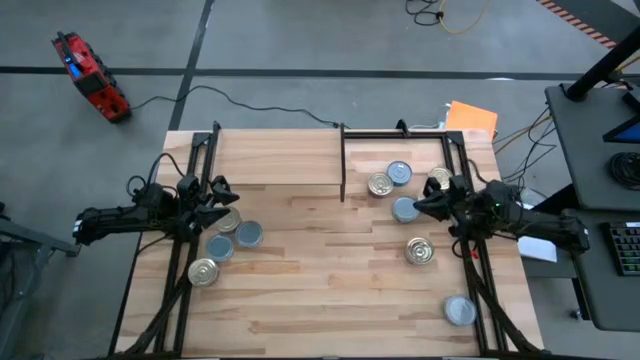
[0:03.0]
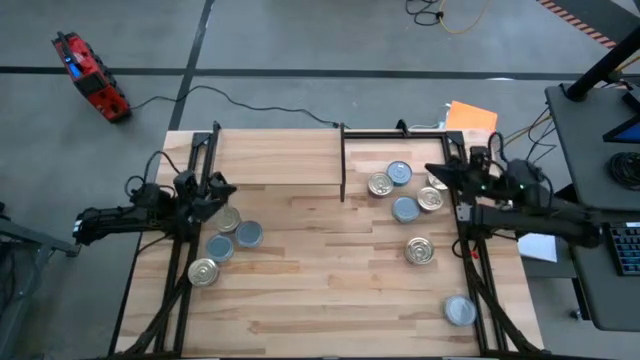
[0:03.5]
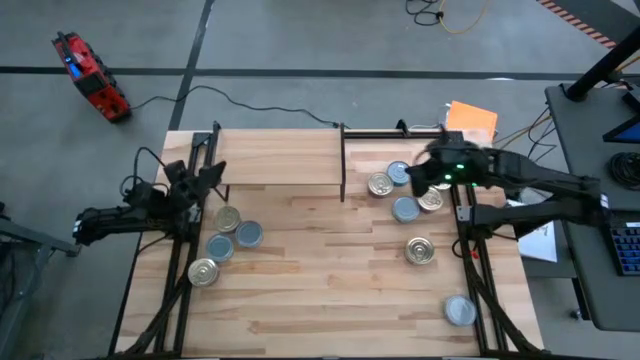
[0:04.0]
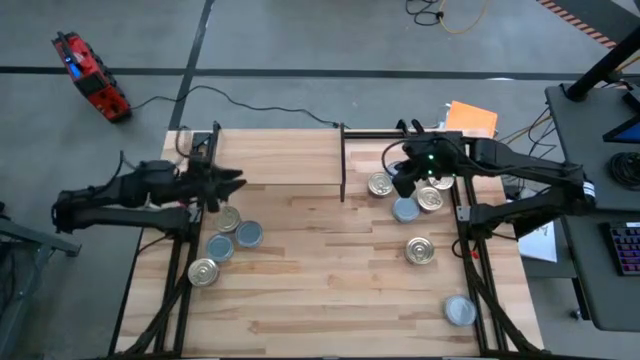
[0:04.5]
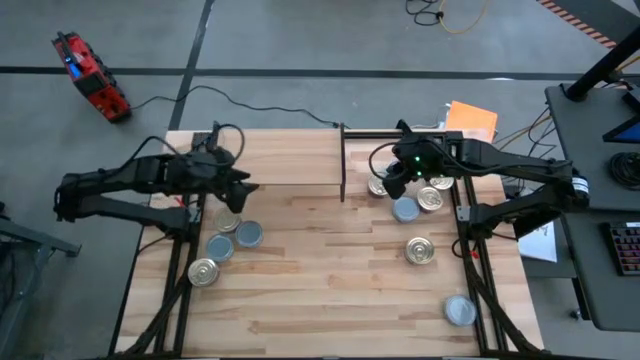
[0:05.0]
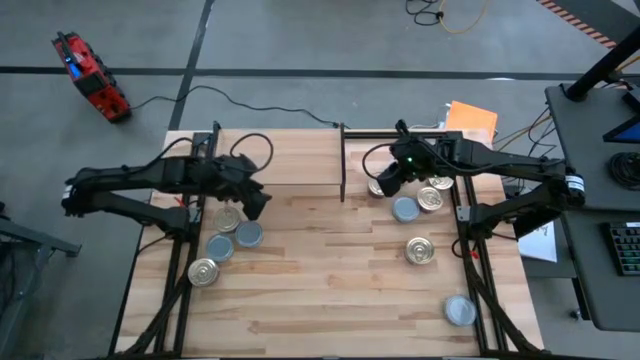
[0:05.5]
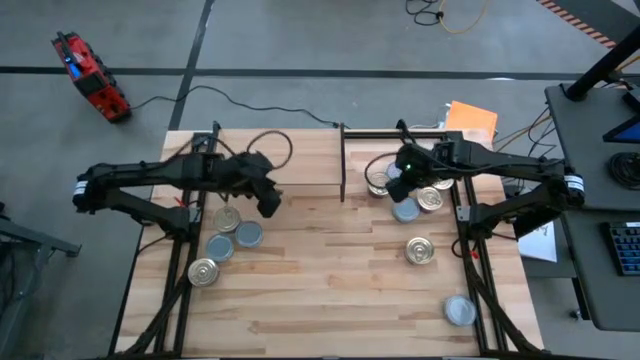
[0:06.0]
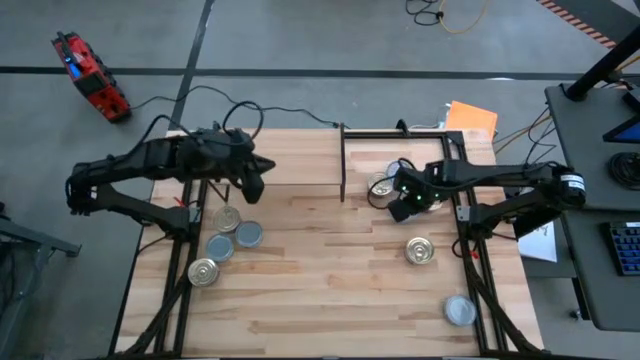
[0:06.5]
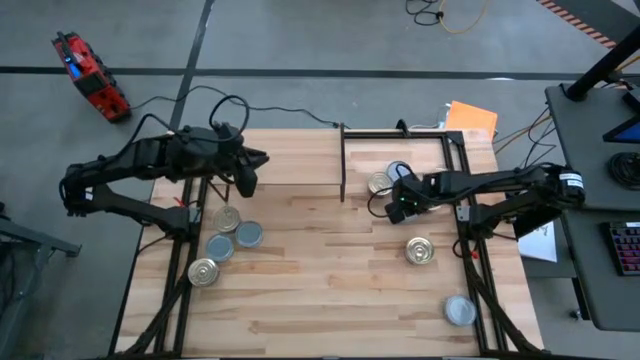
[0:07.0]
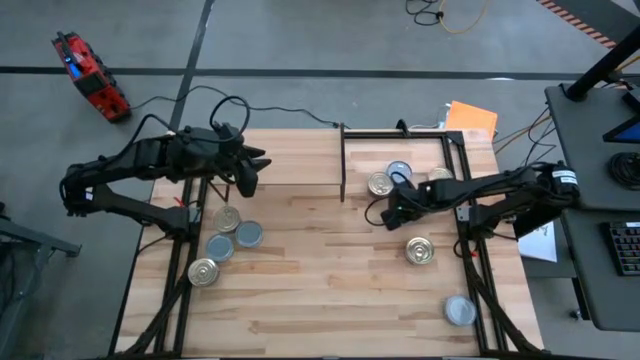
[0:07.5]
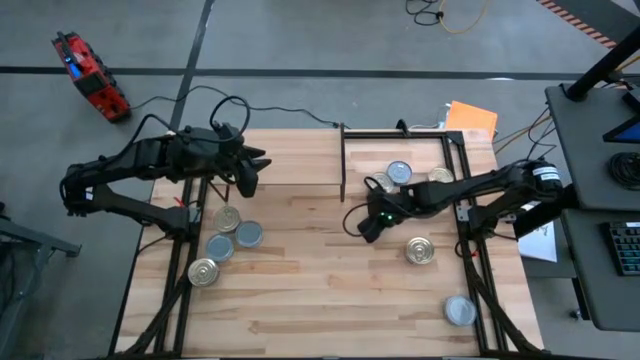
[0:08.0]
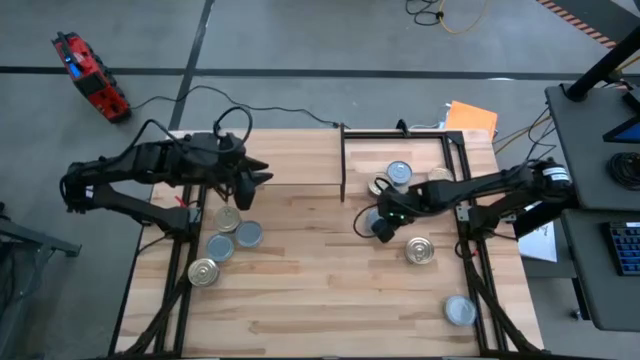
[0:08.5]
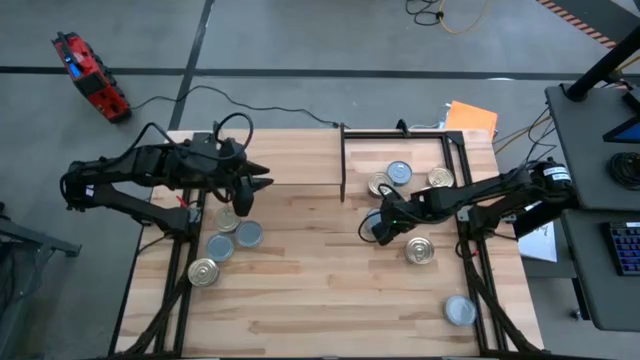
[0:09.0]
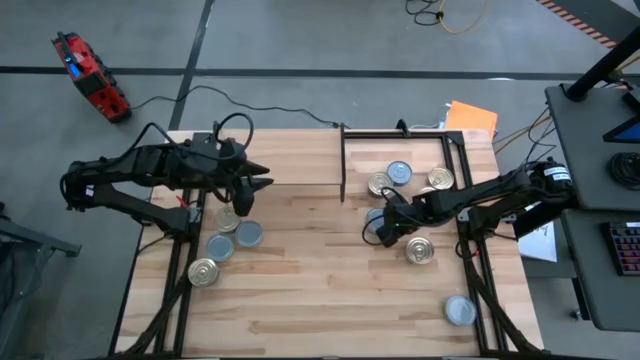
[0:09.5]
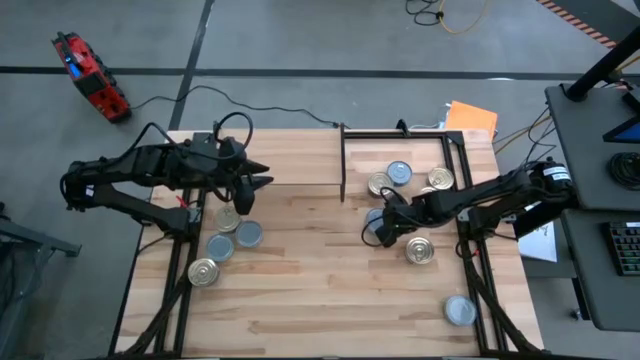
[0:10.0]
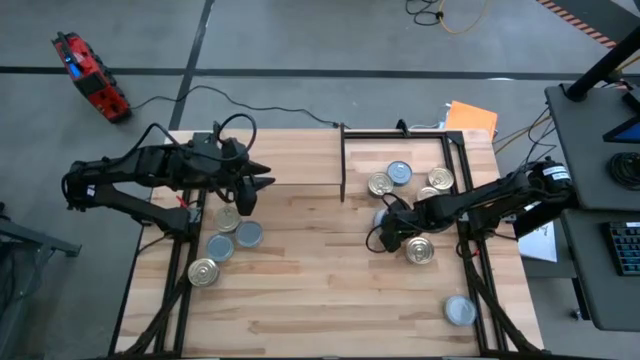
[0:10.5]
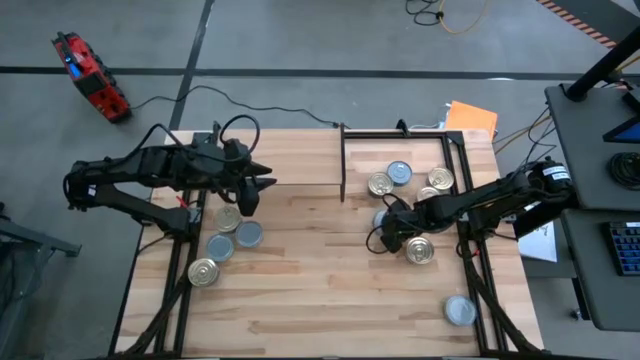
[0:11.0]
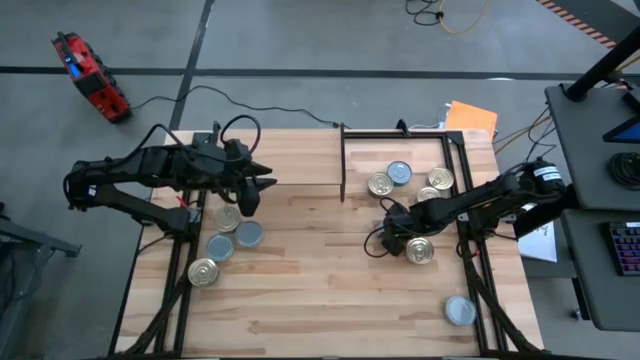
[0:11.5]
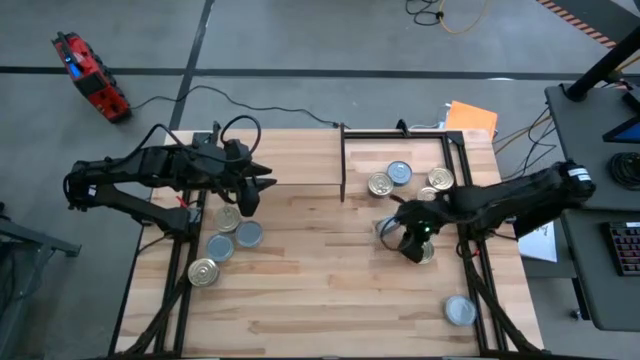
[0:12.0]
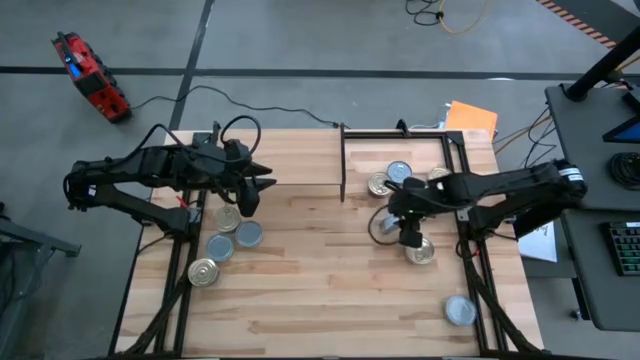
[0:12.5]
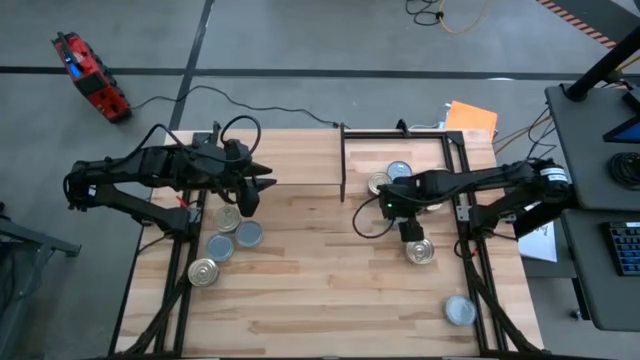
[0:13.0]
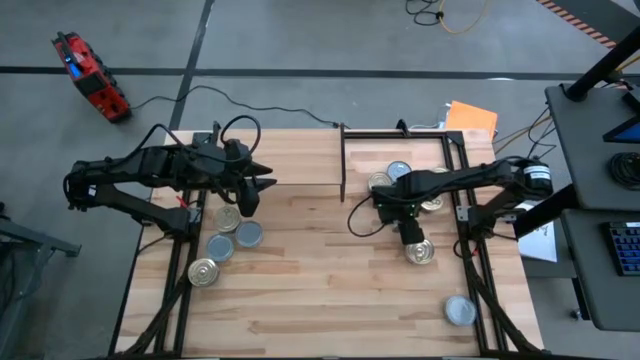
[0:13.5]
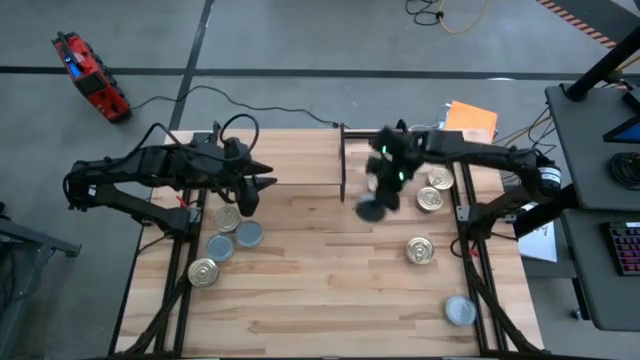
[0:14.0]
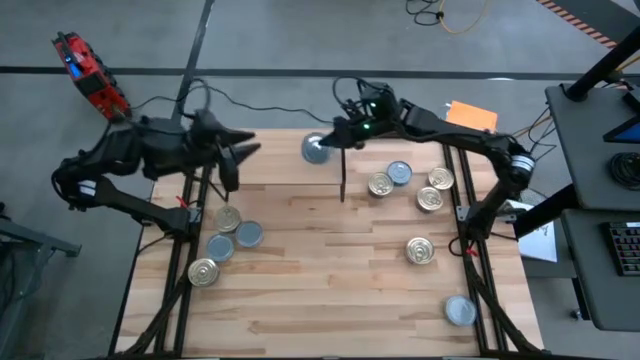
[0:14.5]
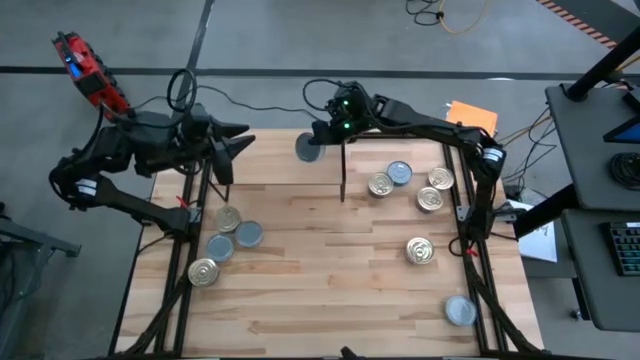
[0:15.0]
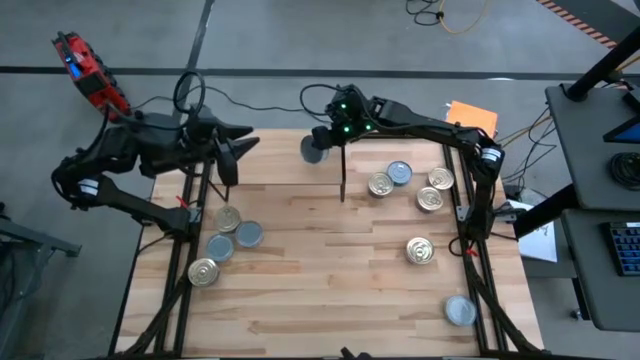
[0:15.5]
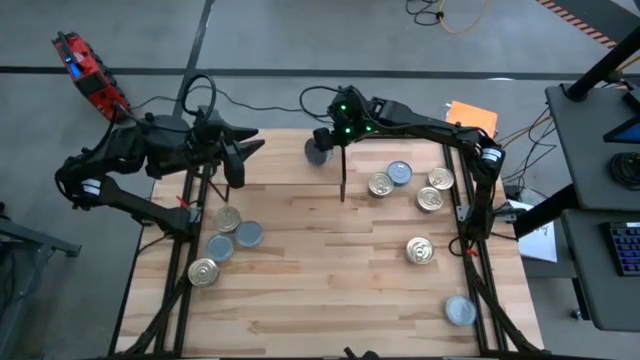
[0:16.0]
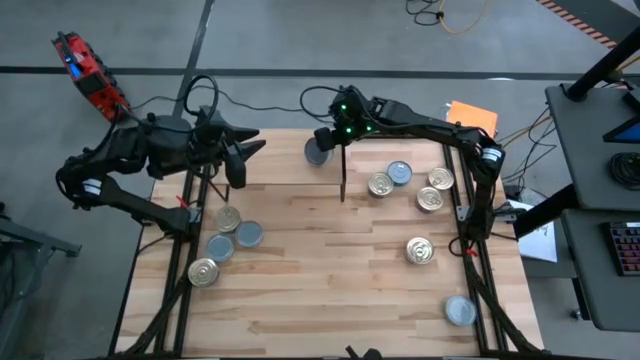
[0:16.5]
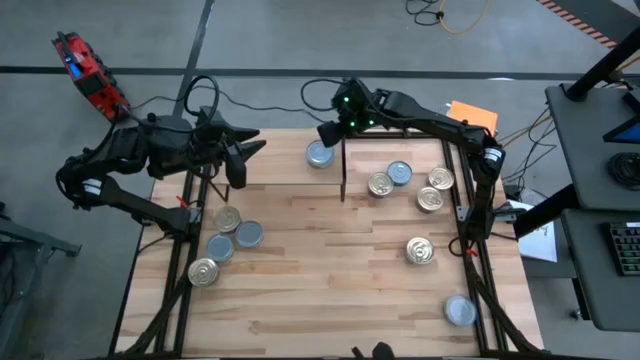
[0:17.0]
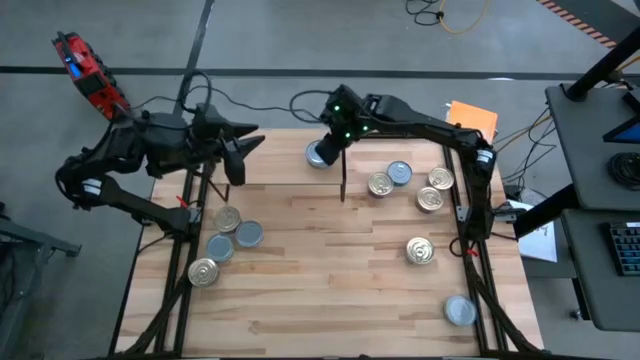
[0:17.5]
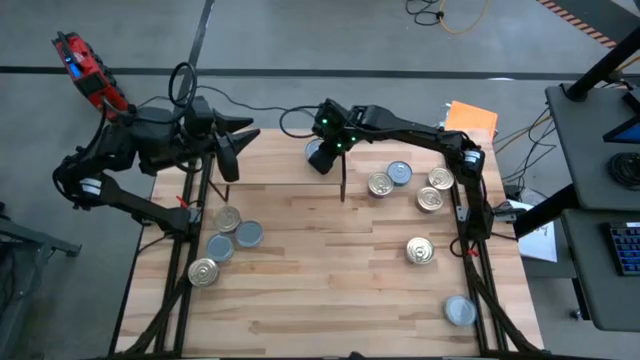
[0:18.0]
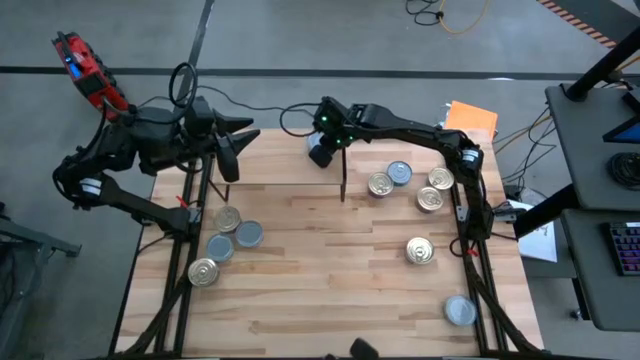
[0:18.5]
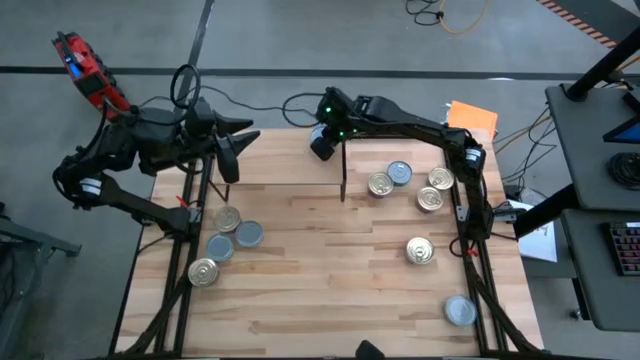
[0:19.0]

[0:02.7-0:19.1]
Task: Stack canned seafood by type on shelf
Put the green tuna can on the shelf

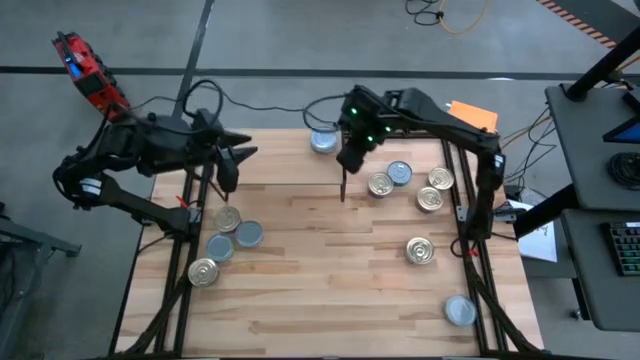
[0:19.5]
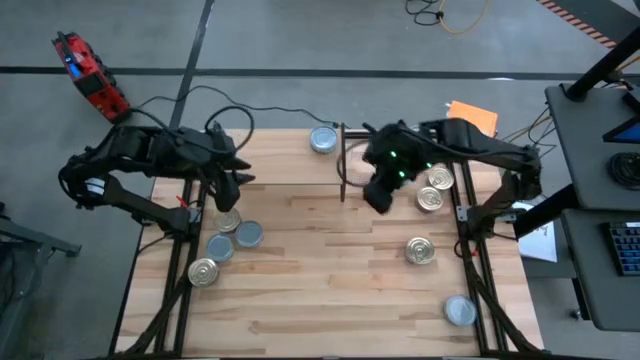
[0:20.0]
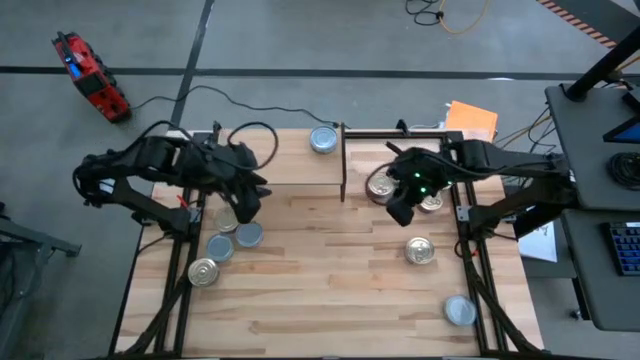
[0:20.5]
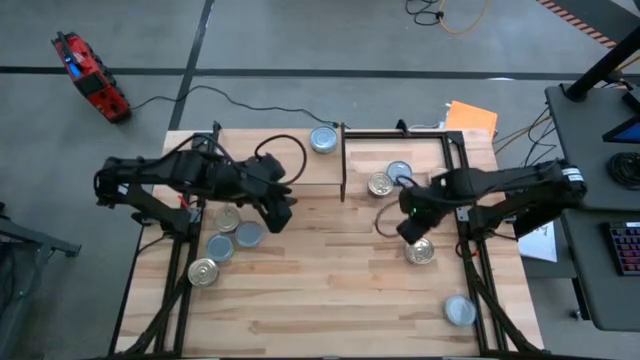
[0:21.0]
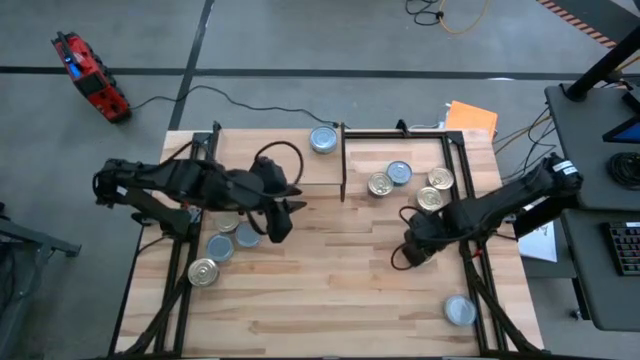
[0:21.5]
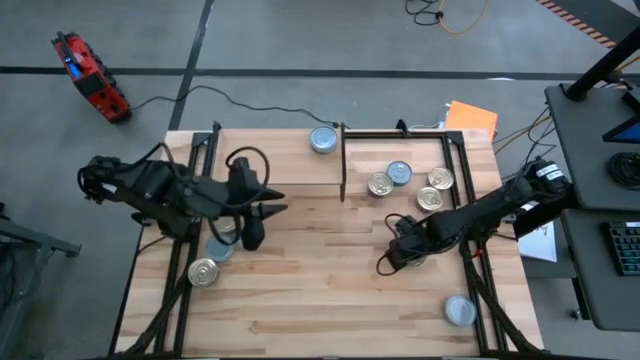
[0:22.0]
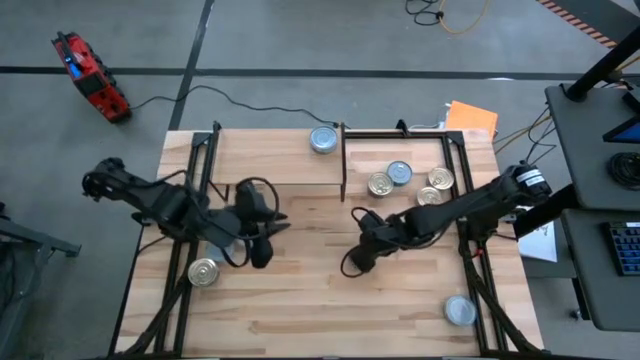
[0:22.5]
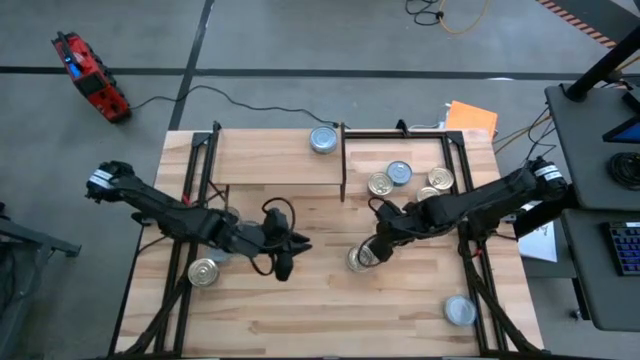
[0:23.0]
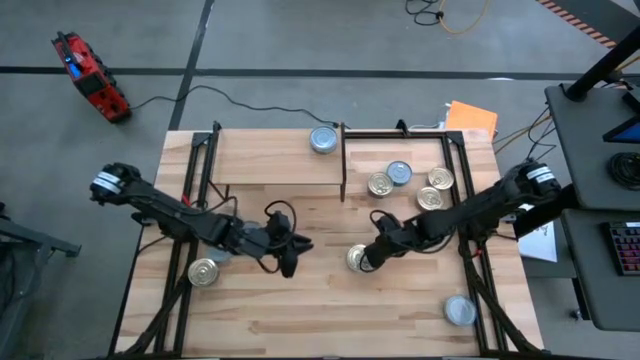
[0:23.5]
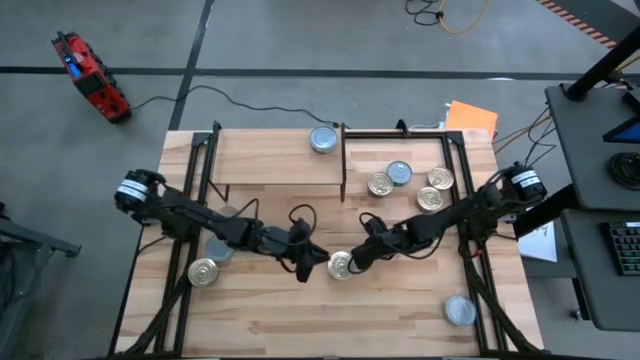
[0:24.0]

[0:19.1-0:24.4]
Move the blue and pink tuna can to the center of the table
